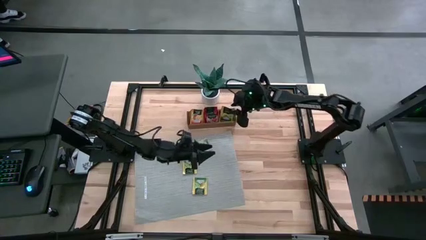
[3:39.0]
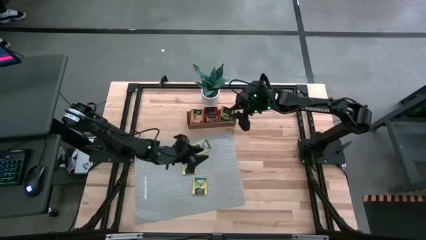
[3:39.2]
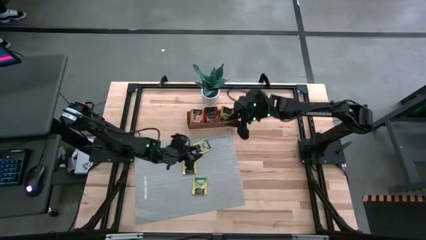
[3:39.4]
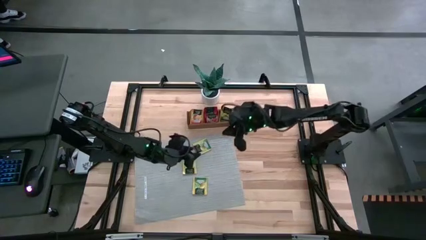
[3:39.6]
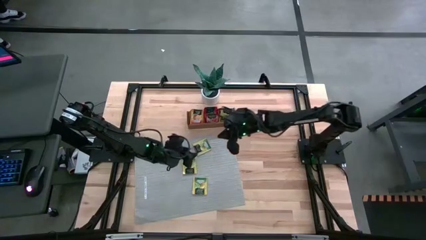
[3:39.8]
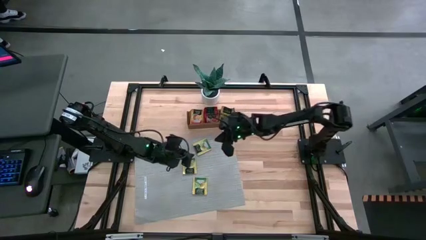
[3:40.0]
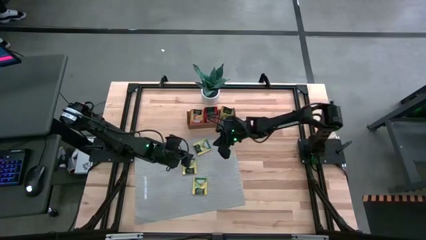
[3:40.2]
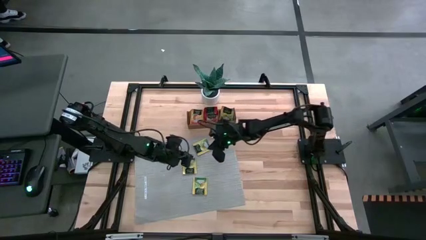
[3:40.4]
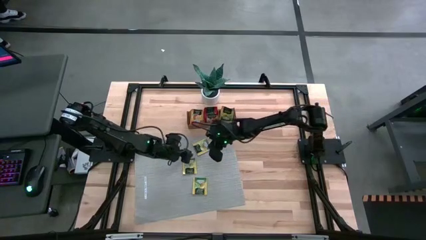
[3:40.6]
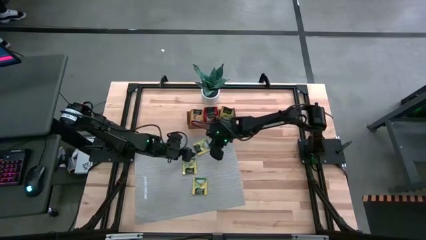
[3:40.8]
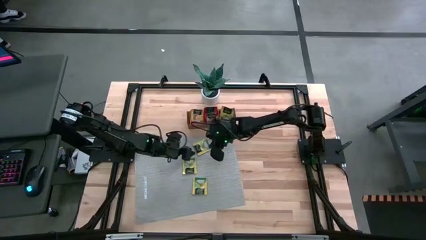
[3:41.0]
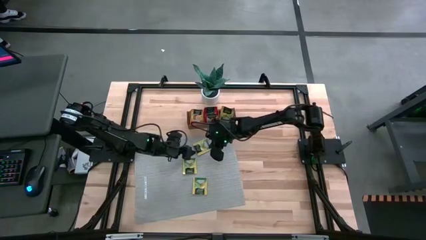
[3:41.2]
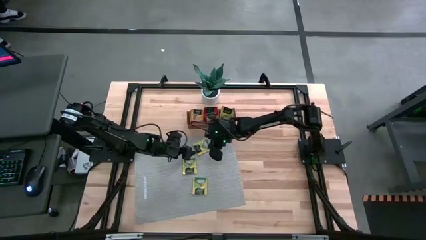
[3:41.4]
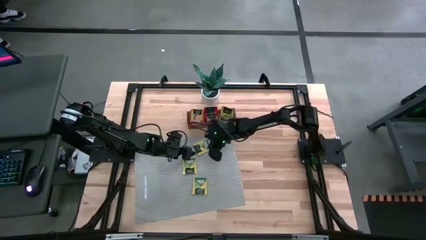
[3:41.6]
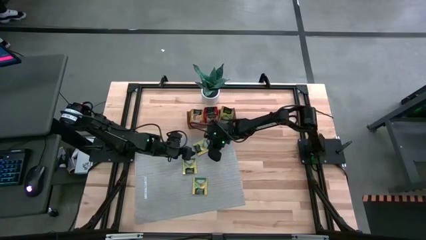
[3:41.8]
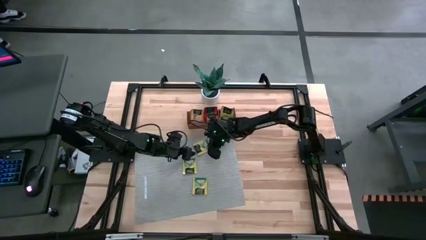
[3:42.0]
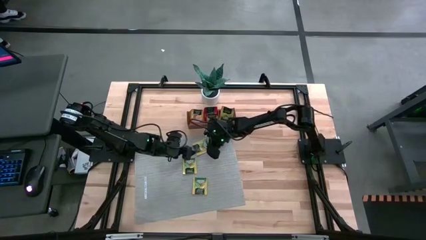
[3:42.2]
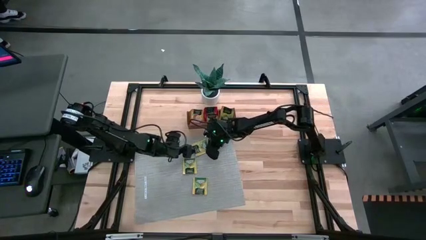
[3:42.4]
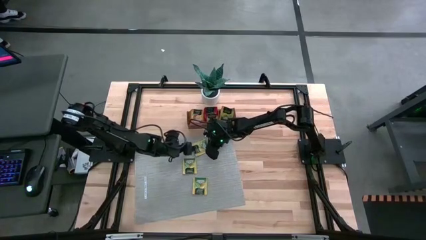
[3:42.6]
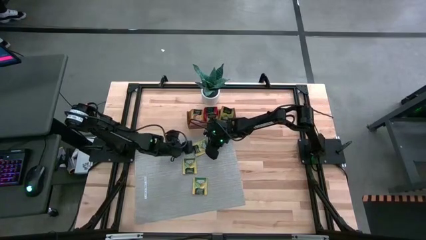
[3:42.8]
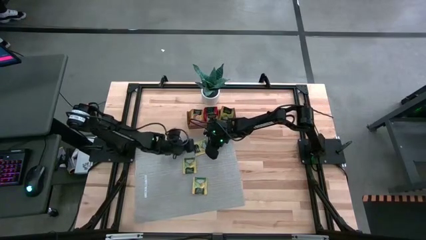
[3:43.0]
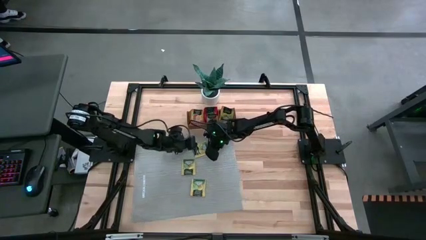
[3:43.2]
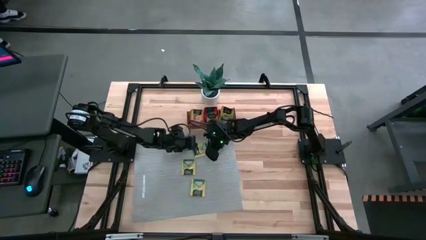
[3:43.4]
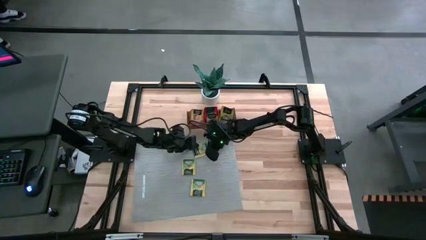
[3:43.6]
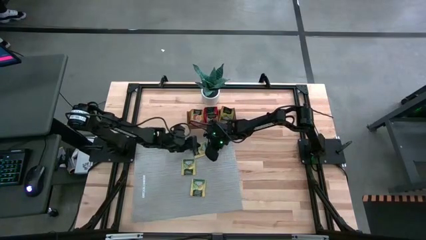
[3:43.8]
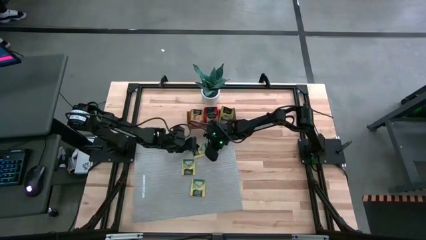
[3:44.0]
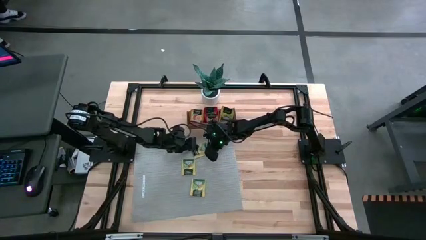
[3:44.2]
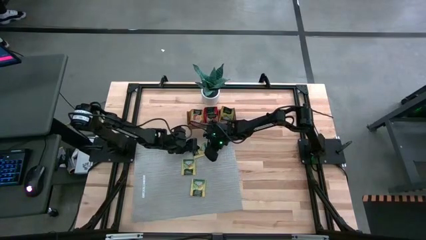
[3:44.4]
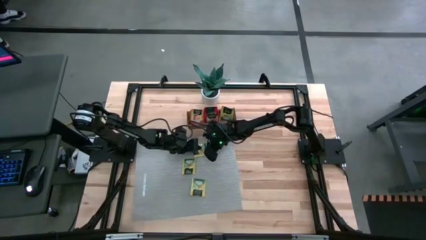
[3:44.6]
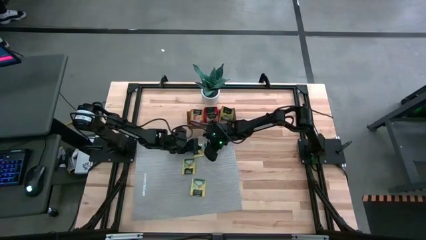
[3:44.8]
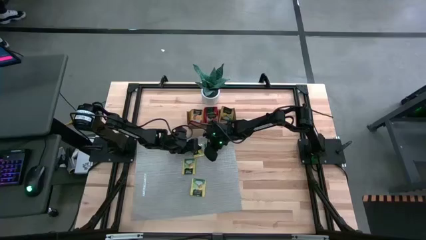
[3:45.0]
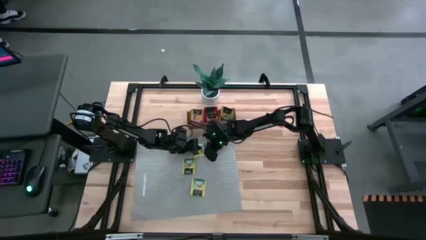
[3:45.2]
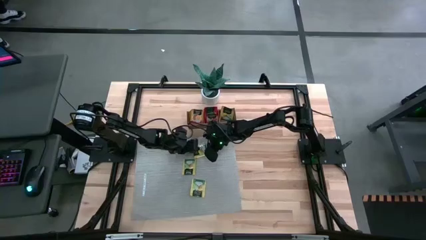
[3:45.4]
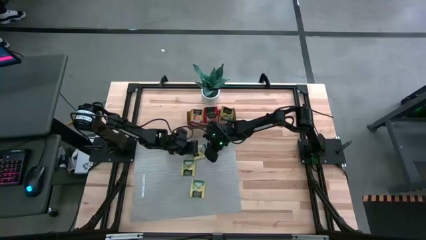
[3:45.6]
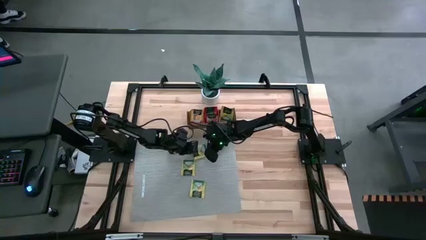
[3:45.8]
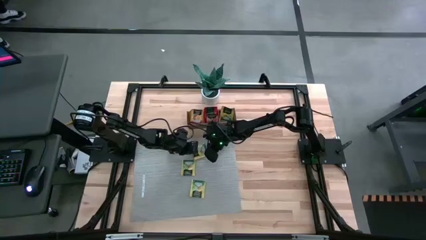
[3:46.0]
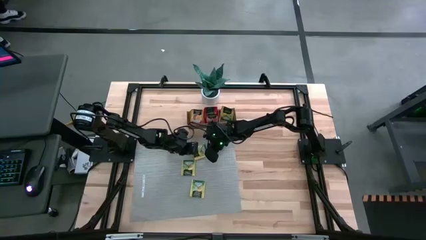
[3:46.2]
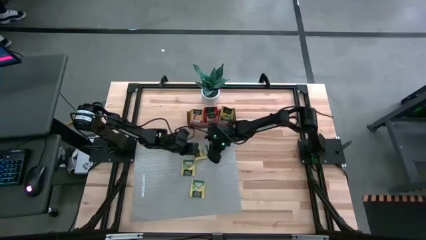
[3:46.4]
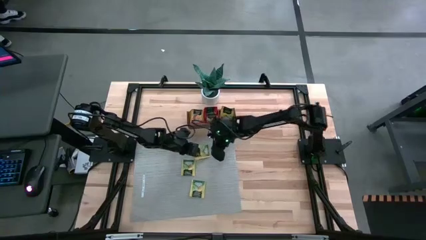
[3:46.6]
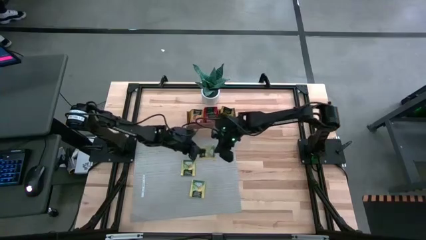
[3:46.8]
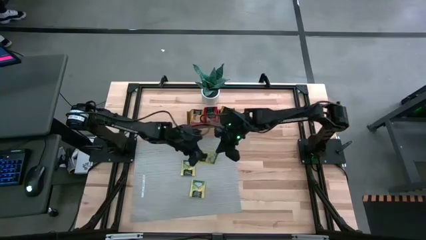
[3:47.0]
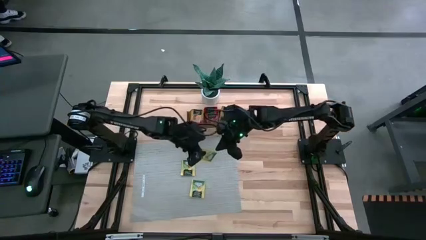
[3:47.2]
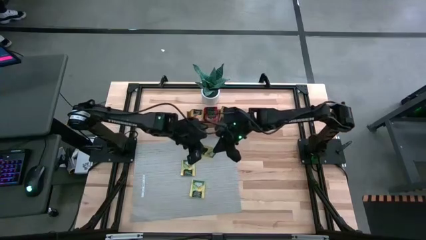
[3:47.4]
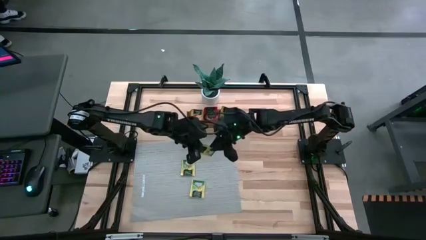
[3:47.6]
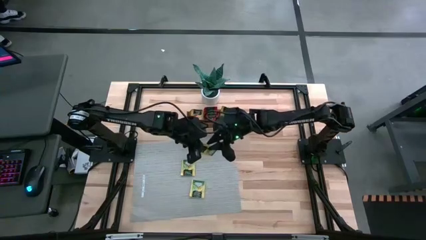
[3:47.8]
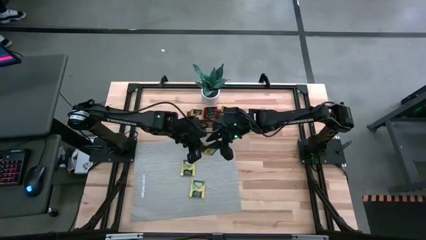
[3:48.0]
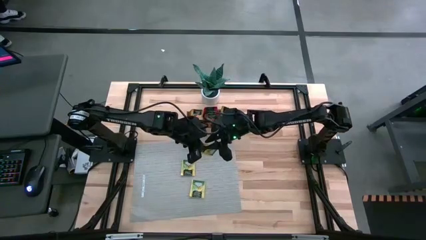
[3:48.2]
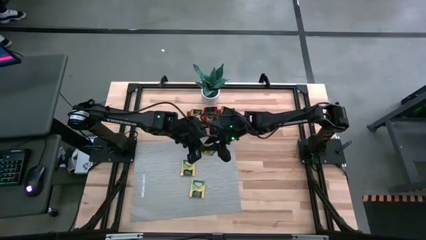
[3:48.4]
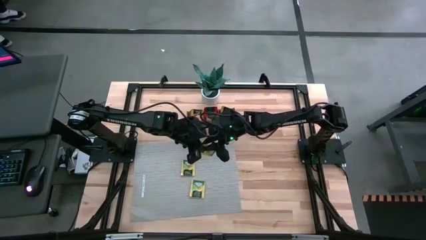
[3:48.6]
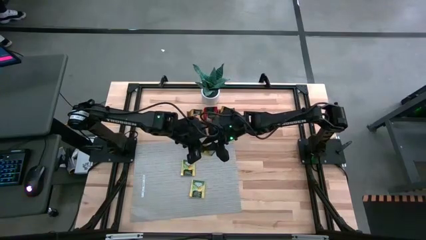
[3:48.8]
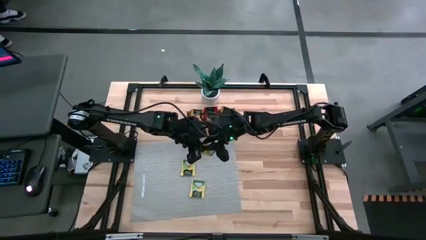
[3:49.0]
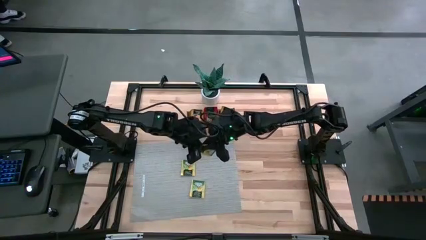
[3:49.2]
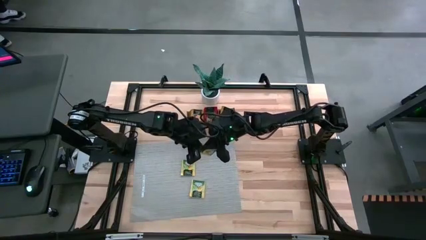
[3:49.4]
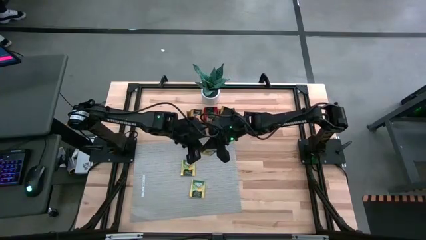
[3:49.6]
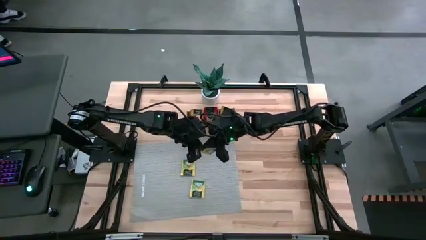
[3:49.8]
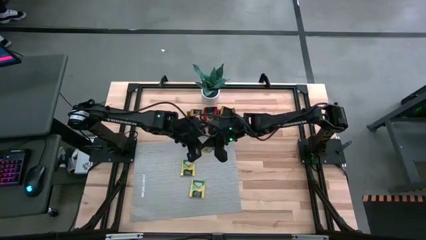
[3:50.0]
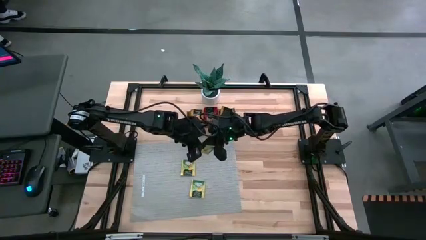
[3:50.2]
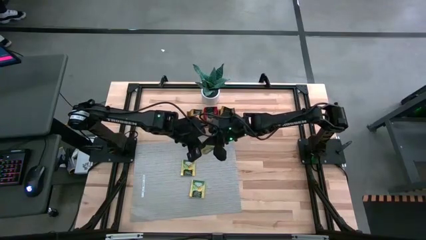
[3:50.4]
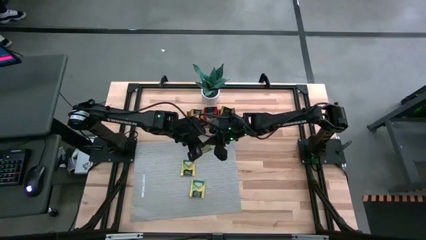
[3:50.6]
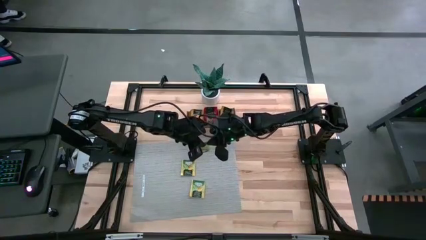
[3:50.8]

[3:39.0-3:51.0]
Task: Pick & Place Tea
Put the yellow tea bag into the right section of the wooden organizer

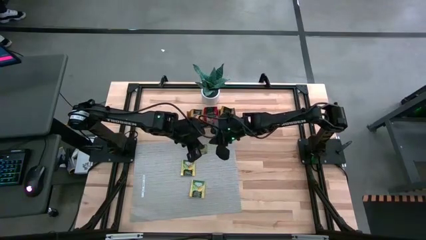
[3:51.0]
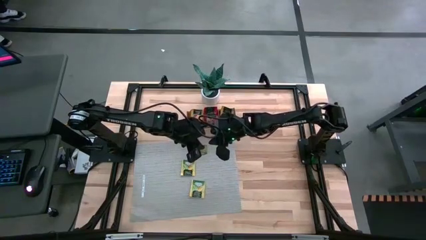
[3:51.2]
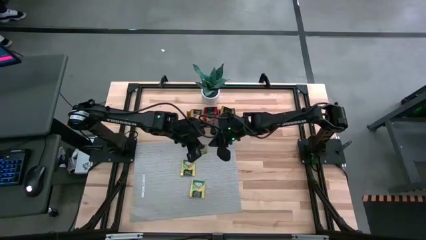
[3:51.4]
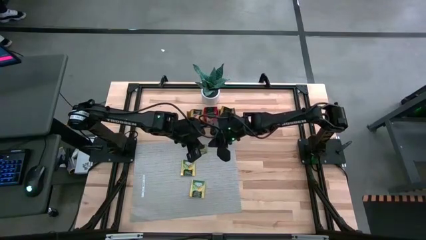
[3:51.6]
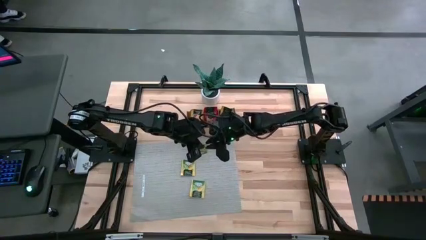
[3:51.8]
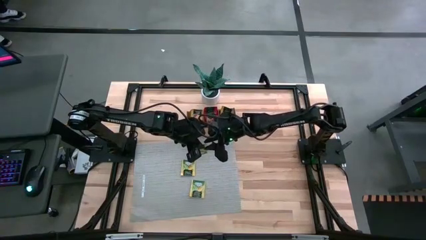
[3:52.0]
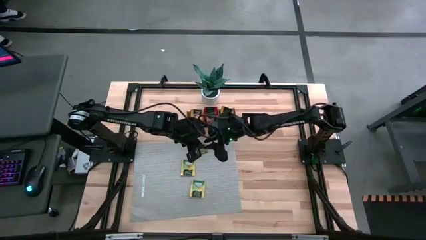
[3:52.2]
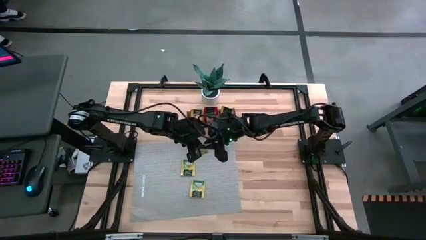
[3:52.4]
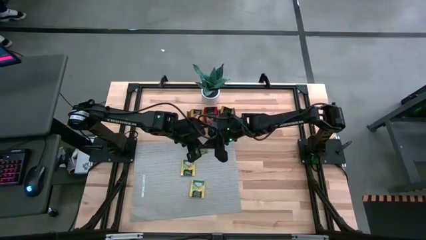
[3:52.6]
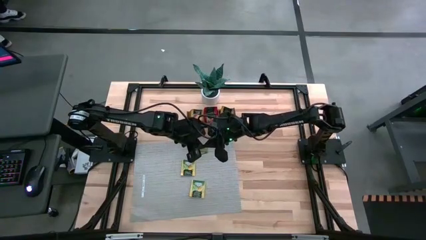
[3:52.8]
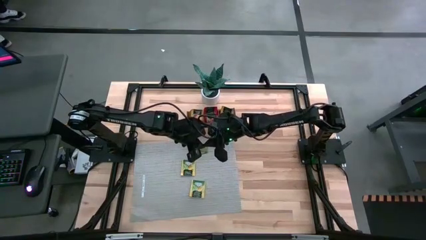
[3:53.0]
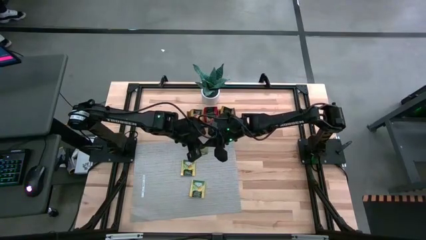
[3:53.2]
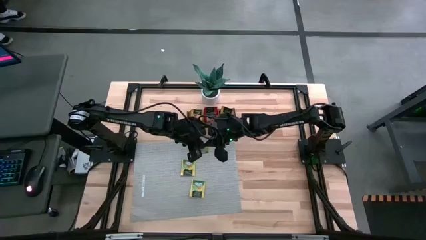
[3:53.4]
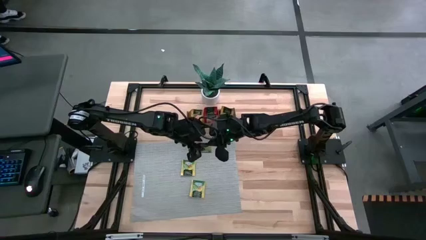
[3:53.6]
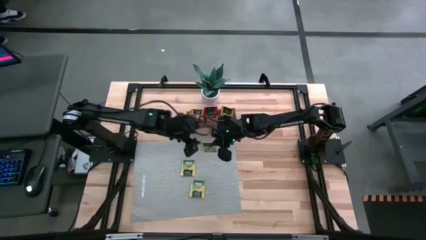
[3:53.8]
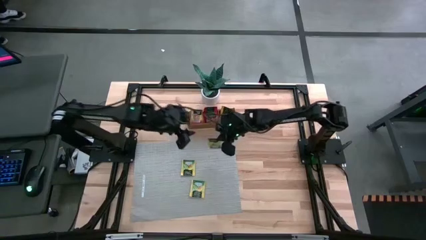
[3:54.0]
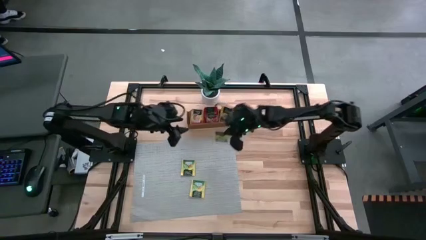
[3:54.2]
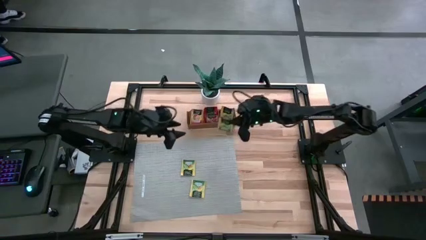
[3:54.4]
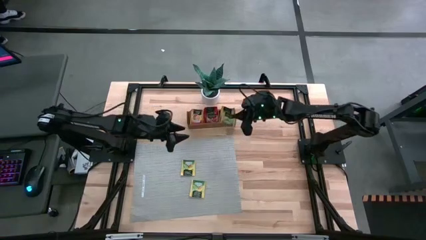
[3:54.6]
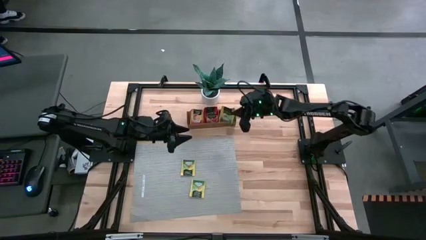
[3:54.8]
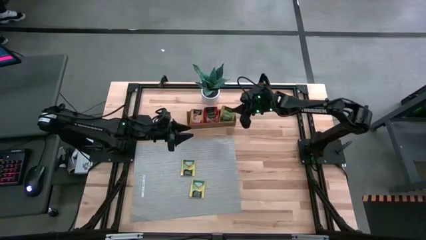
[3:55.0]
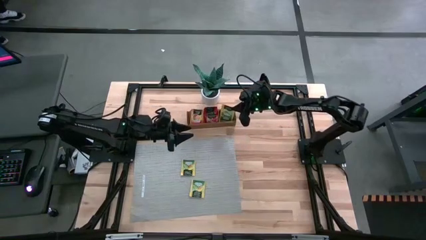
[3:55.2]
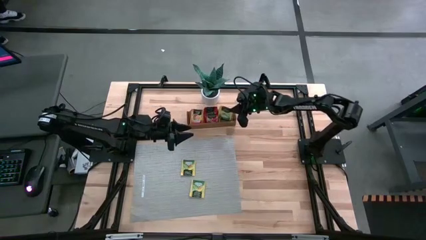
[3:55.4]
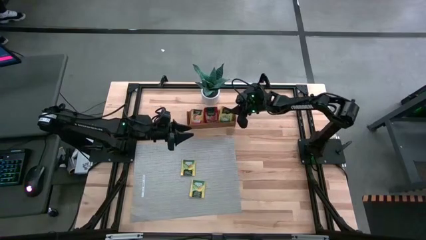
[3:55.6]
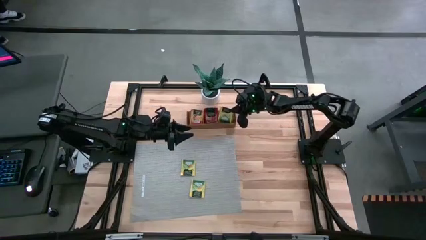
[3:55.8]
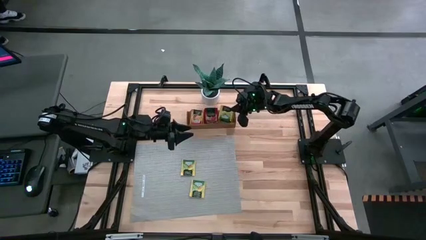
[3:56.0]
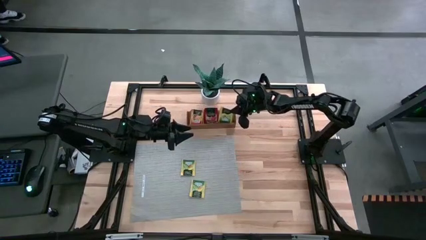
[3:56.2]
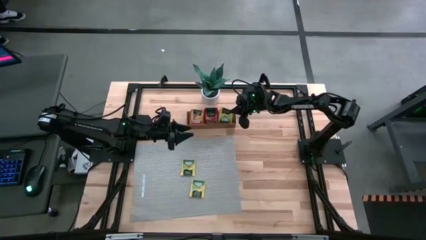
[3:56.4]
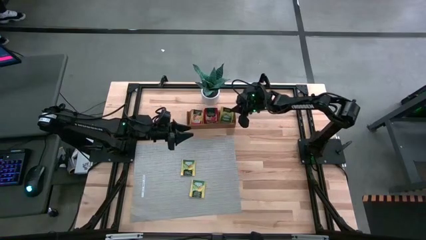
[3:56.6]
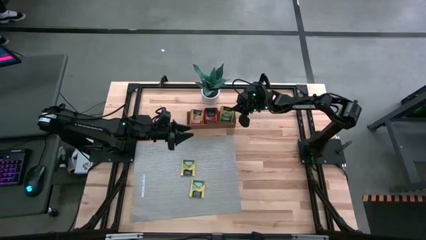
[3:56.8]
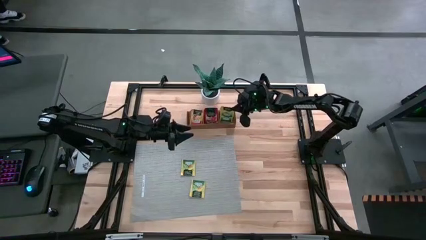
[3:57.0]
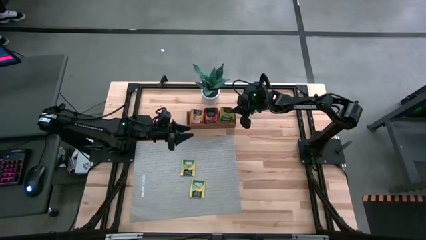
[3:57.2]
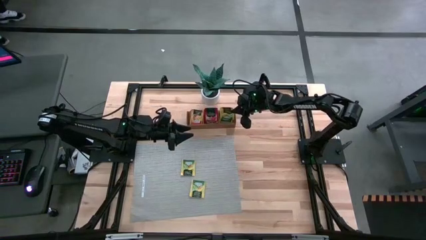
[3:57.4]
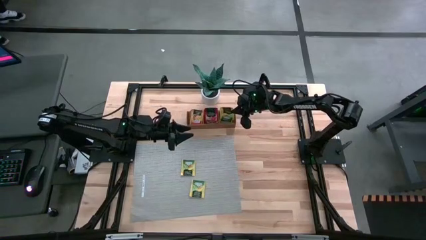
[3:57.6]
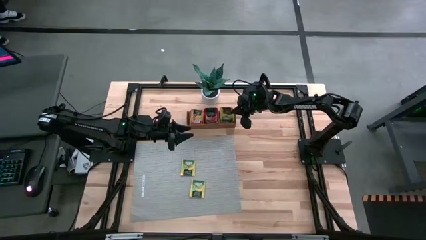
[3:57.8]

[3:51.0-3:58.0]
Put the yellow tea bag into the right section of the wooden organizer
